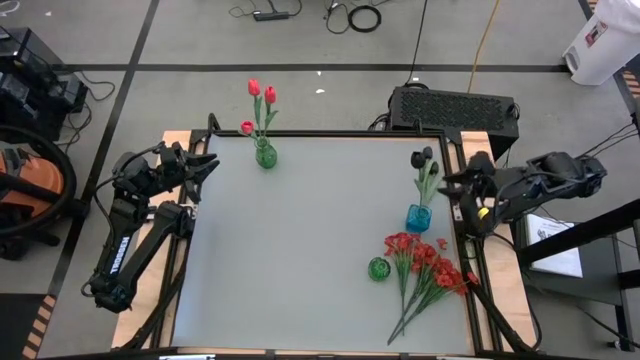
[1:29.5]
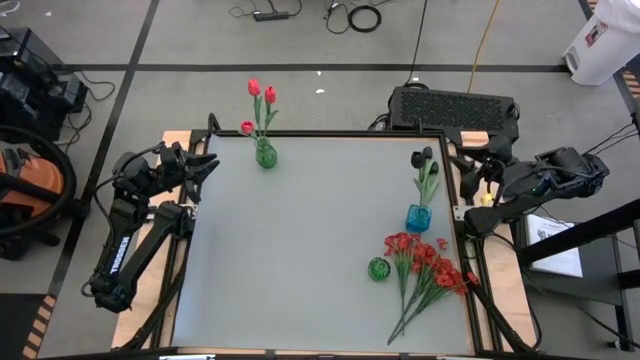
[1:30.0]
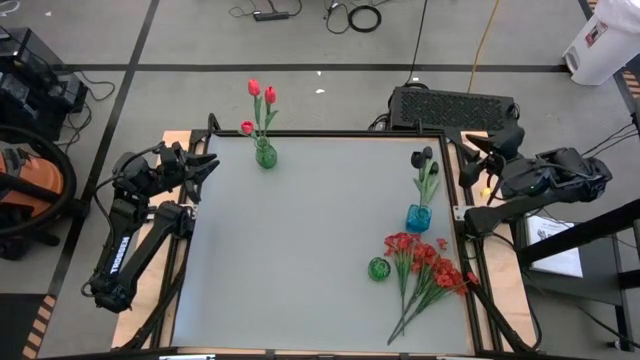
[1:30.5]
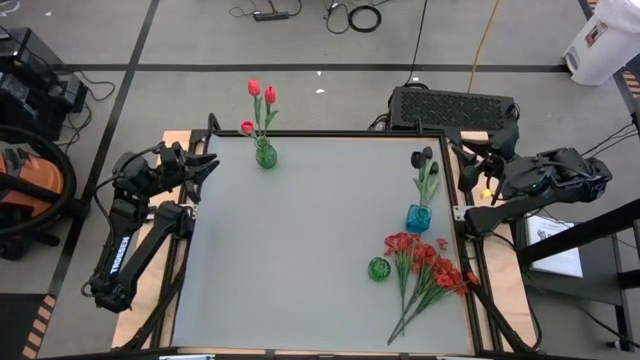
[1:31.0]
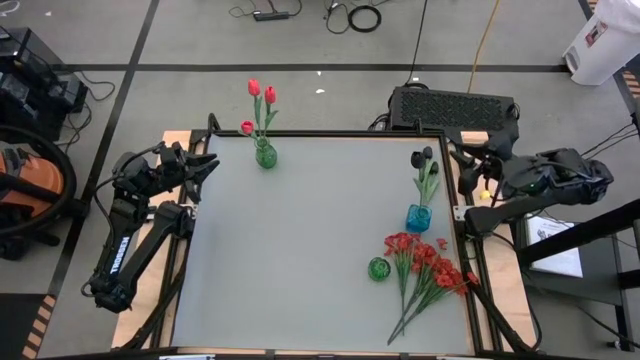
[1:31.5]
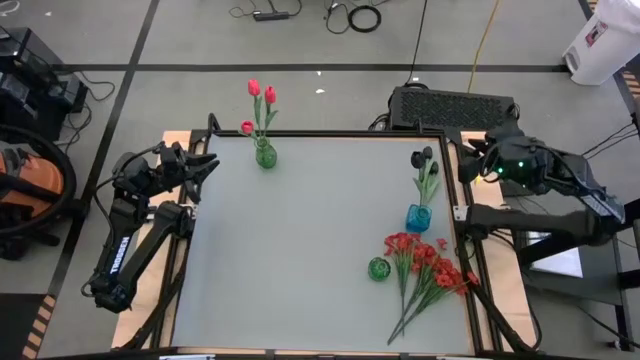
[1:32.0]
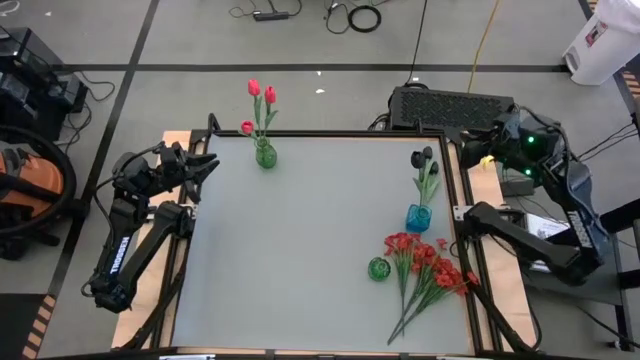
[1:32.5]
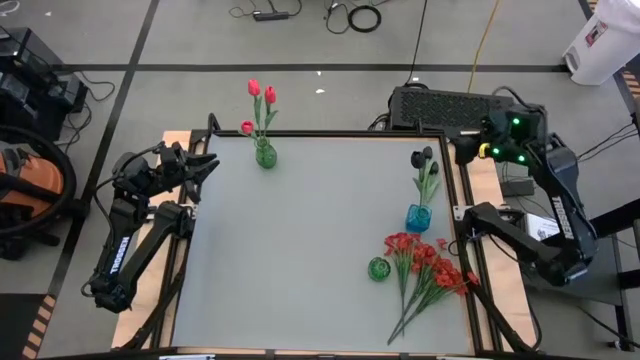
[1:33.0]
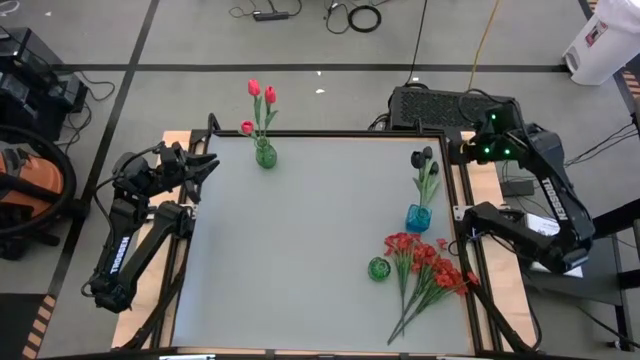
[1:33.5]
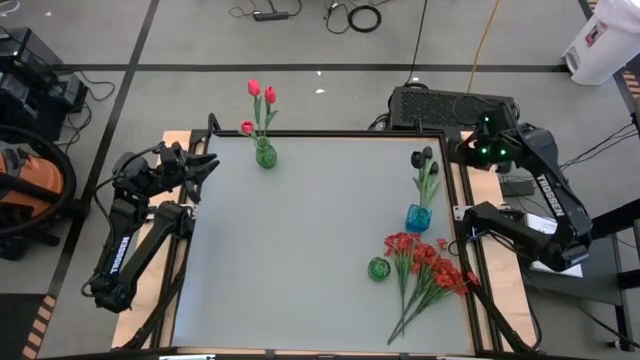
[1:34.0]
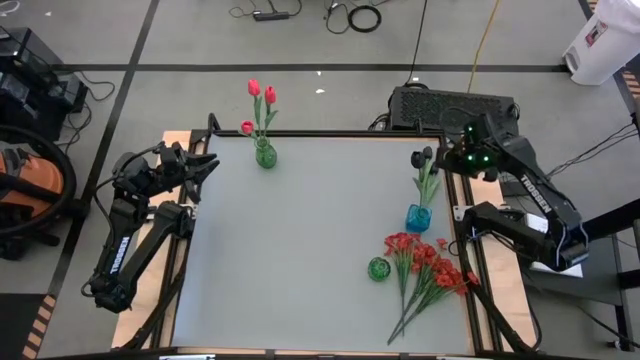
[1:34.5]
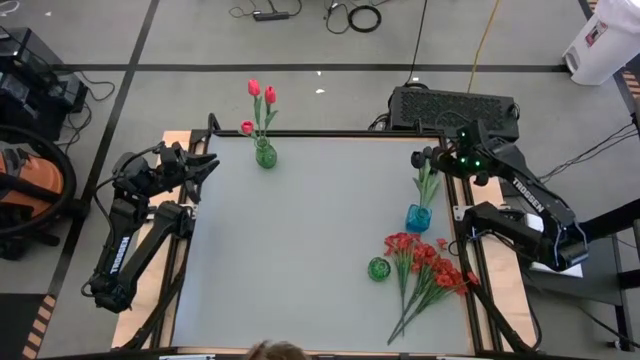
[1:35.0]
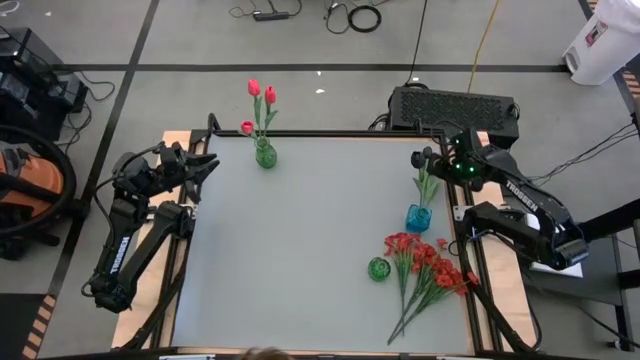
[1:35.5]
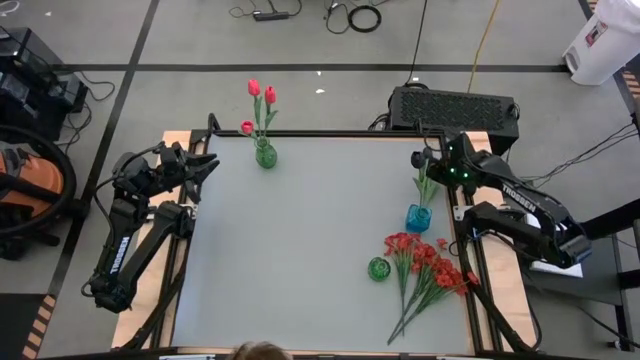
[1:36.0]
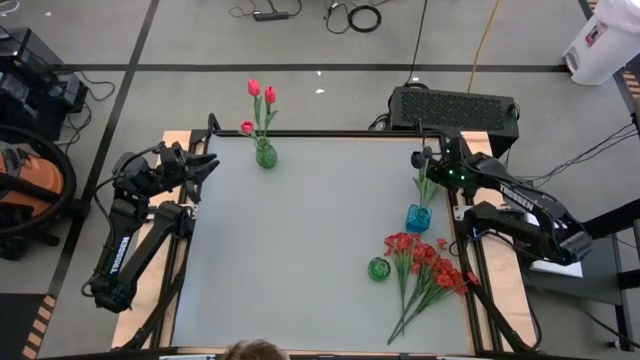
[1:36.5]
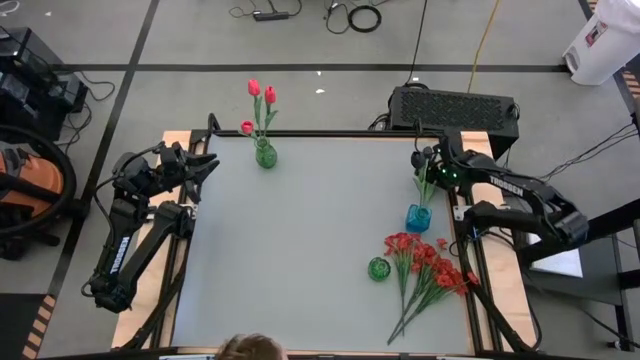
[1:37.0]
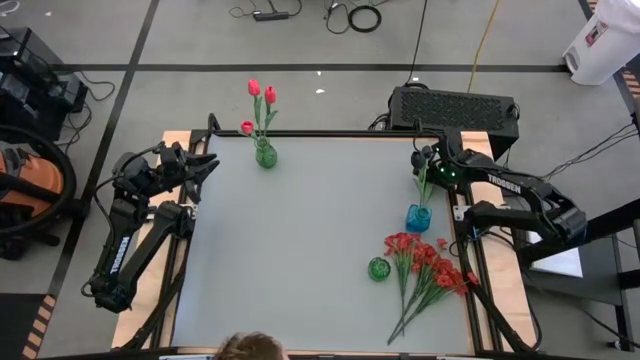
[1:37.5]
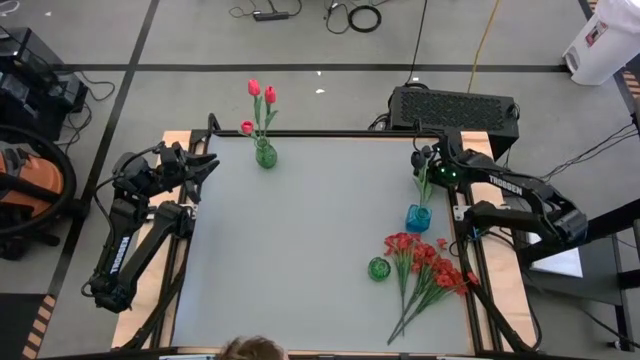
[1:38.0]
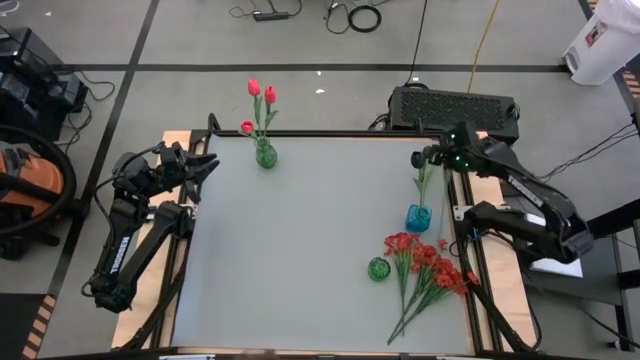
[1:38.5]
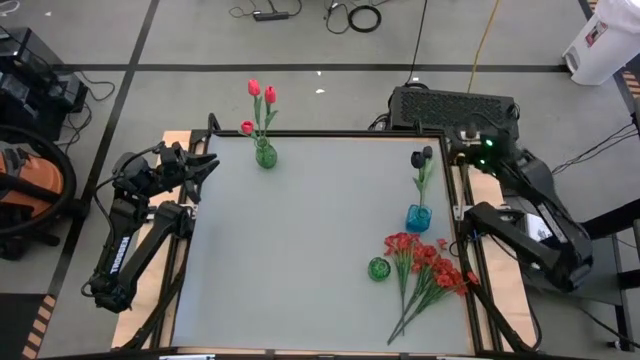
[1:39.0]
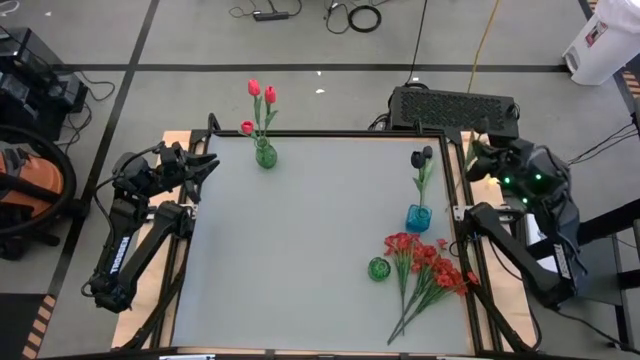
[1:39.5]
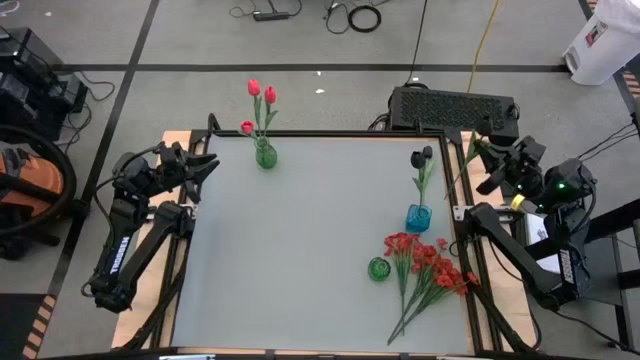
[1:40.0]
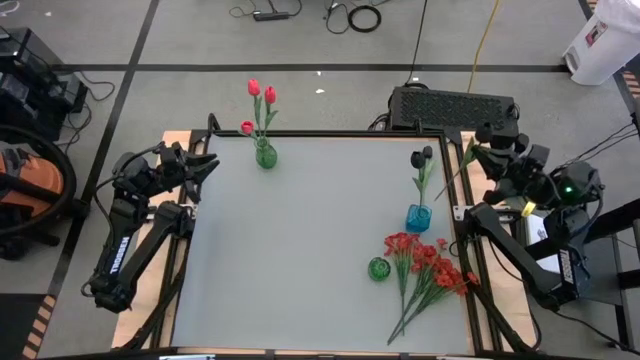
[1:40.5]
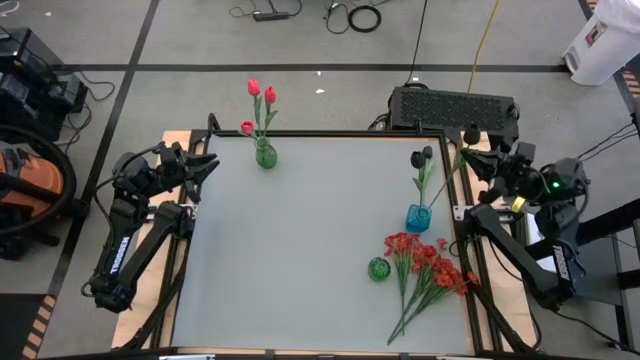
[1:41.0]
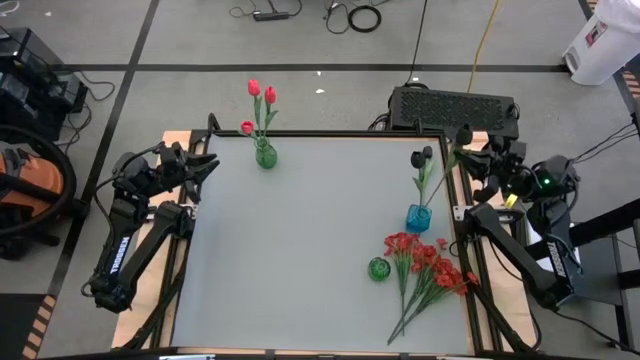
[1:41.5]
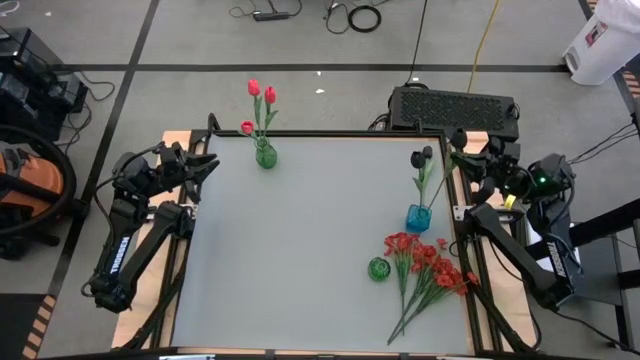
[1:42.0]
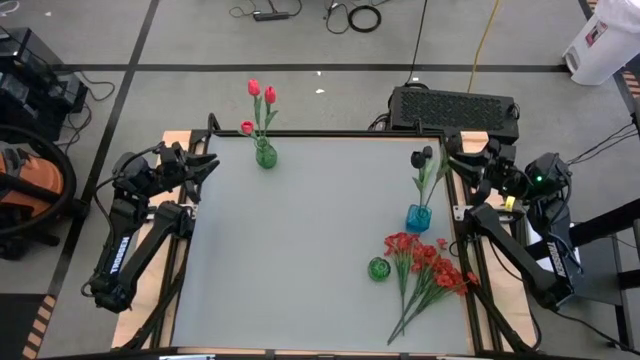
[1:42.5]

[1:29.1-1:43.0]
Task: Sort flowers into vase by color
Put the right black flower into the blue vase

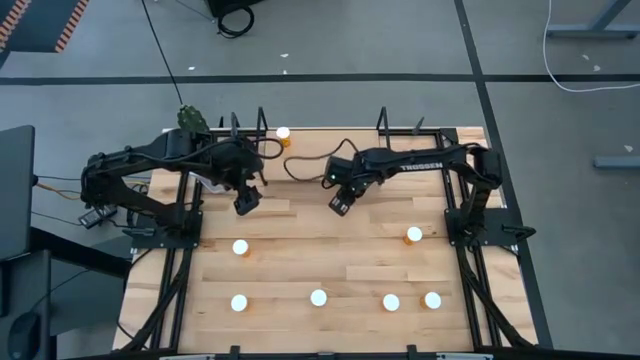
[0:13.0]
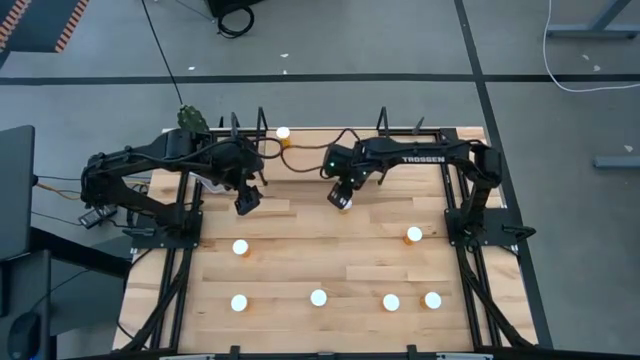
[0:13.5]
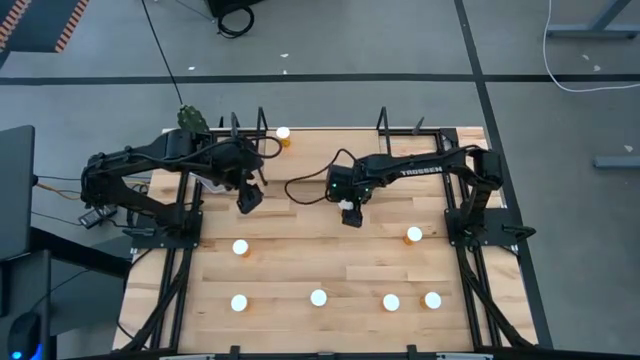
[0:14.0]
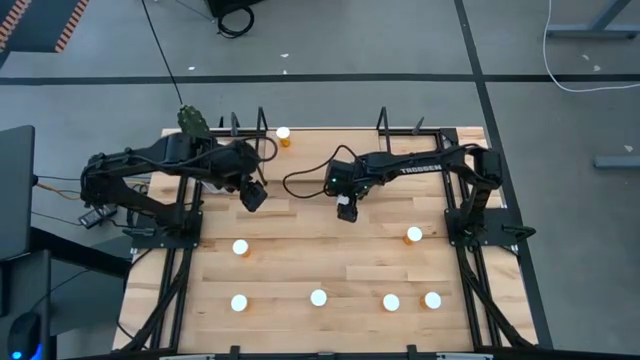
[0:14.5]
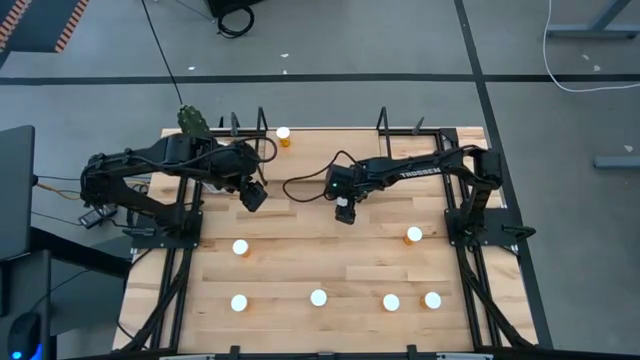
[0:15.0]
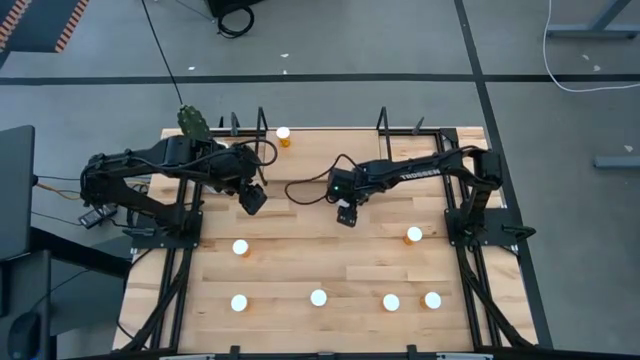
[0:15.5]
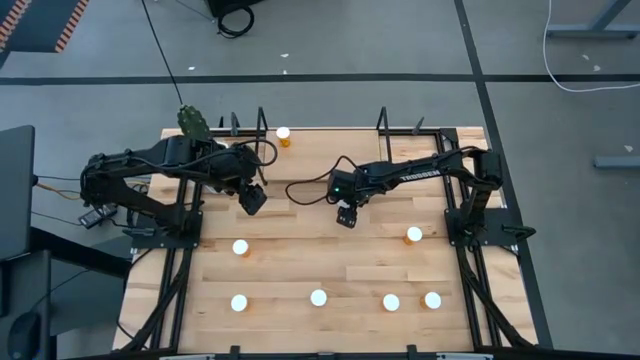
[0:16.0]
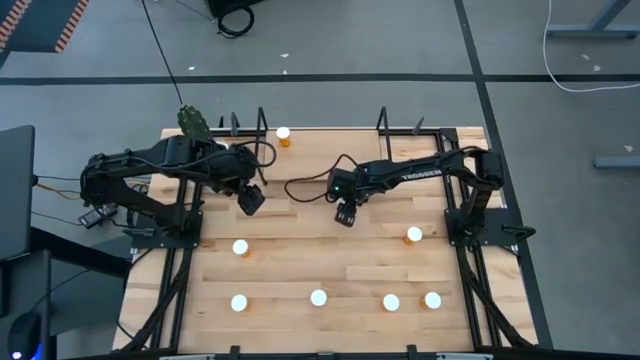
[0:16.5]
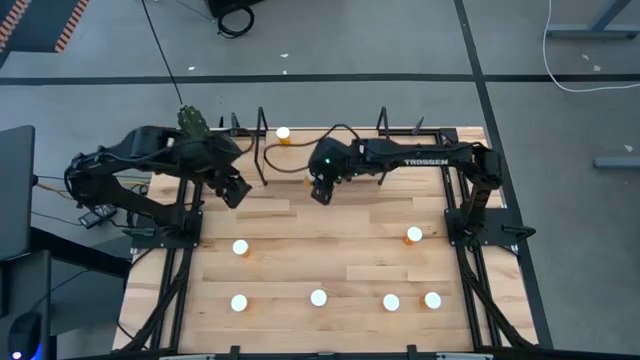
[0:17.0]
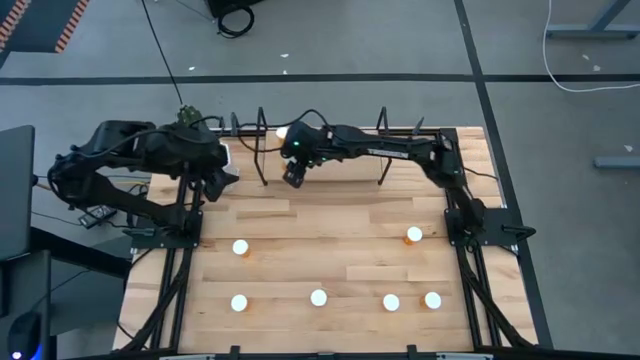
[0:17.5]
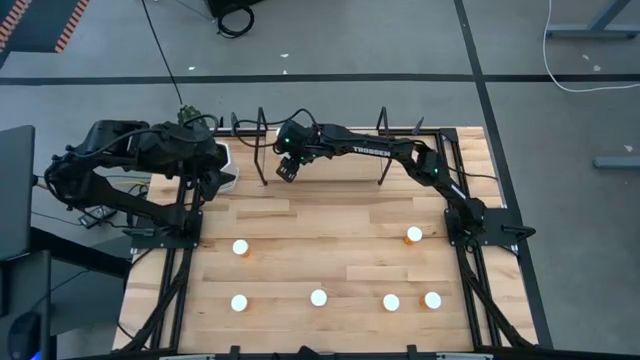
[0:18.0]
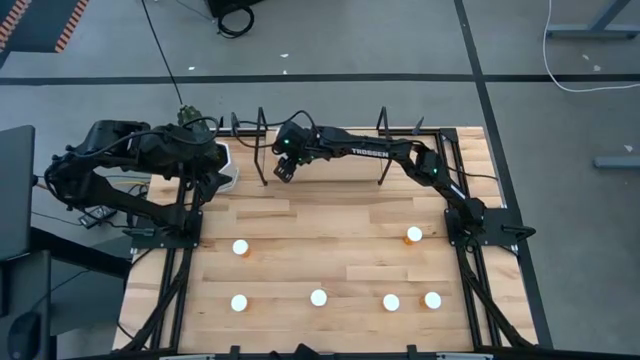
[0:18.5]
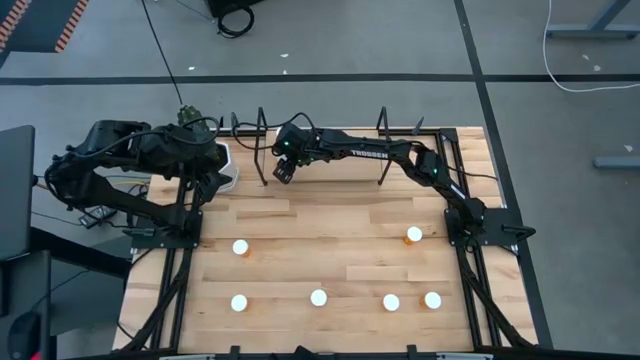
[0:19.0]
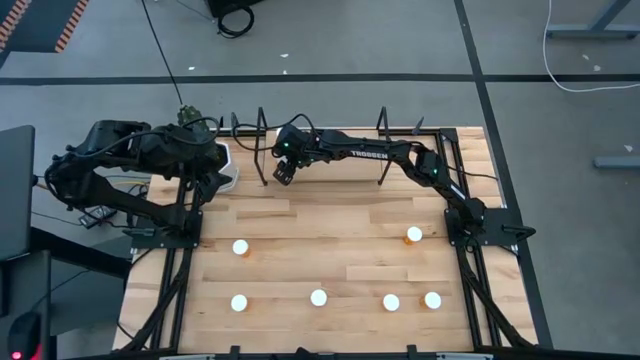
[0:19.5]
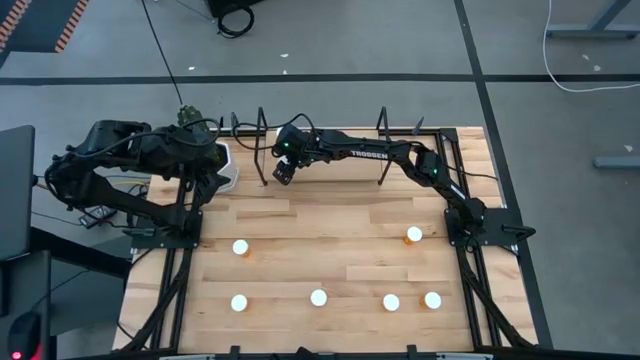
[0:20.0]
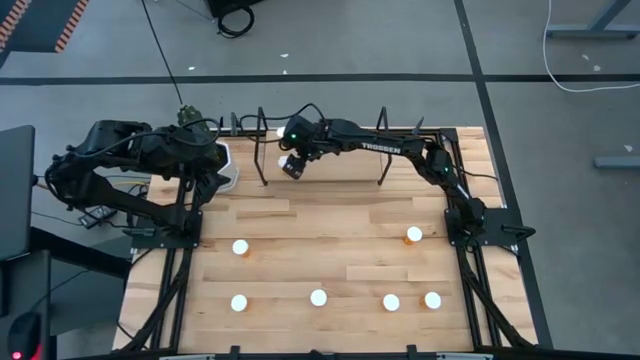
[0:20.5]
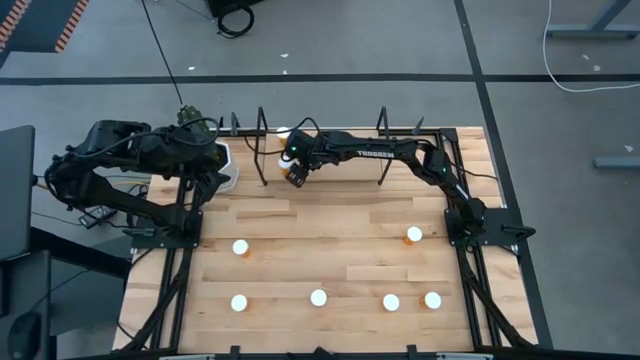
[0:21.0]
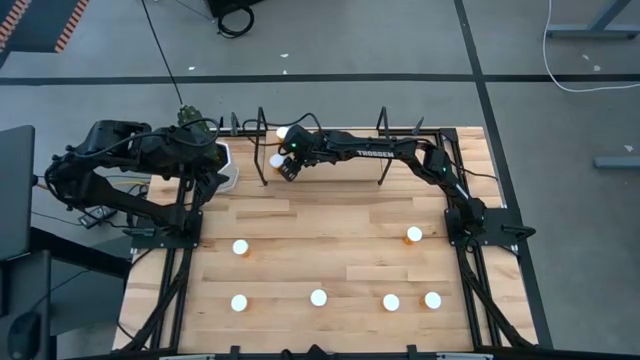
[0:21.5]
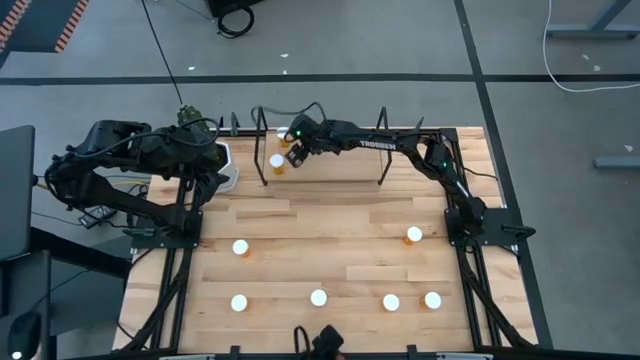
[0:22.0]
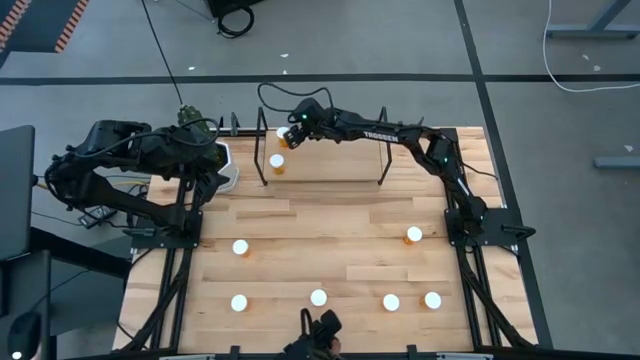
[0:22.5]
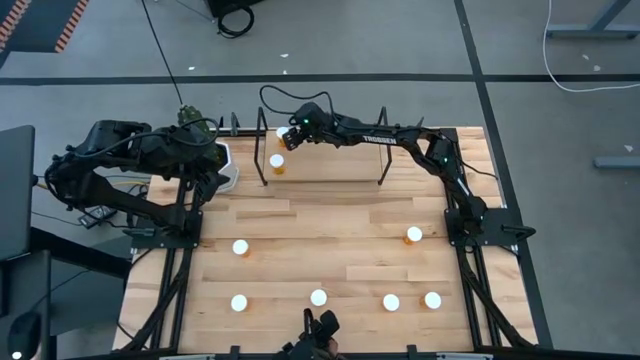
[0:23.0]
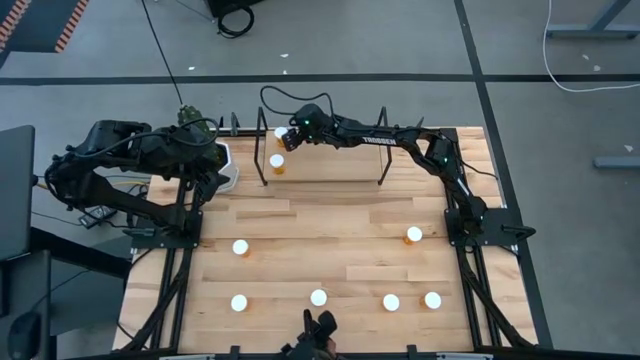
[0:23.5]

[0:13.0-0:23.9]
Task: Pick and place medicine bottles onto shelf by color
Put the orange pill bottle on the shelf
